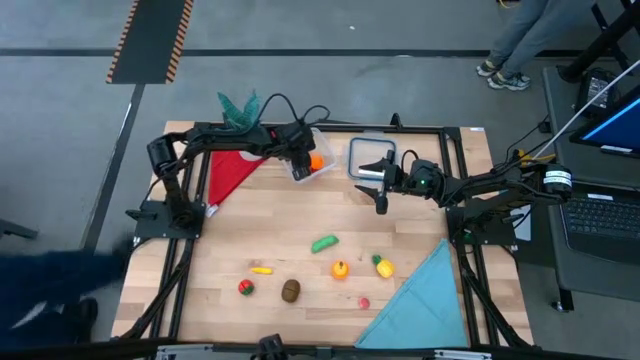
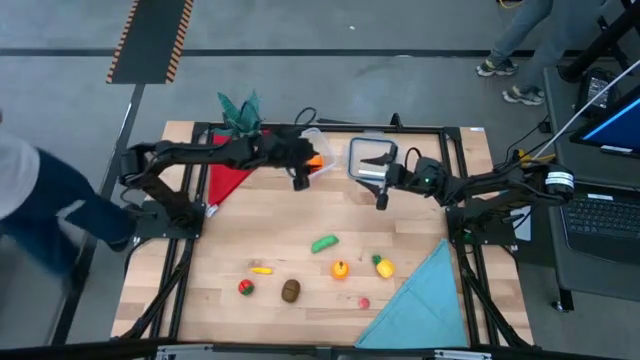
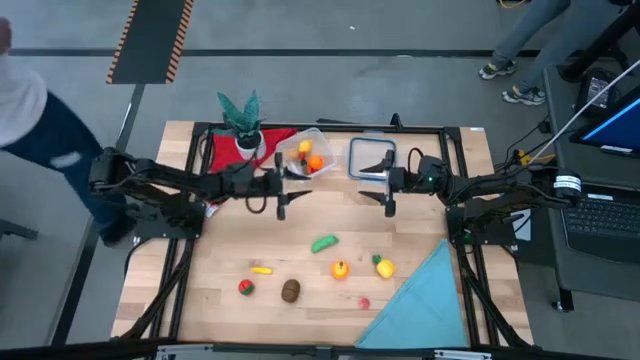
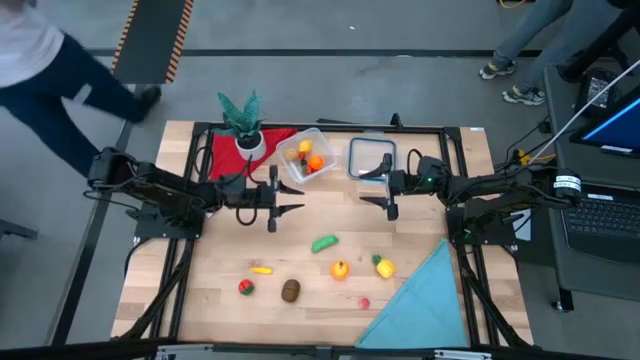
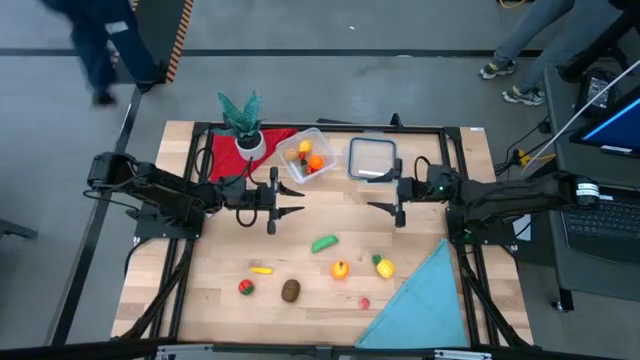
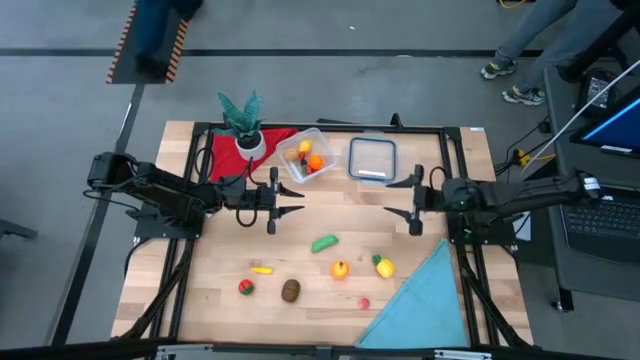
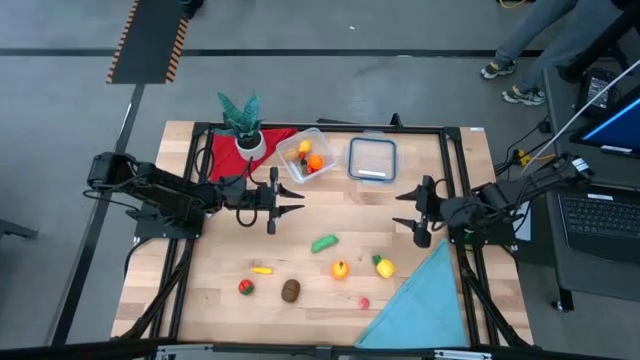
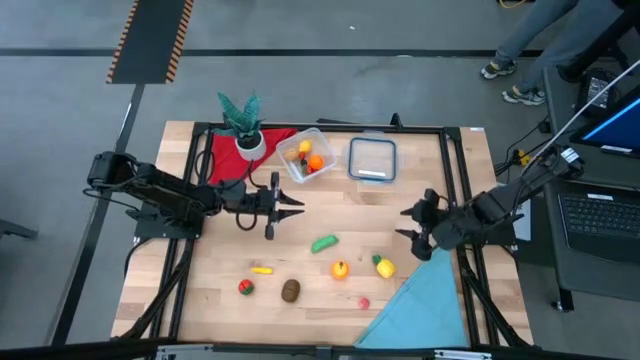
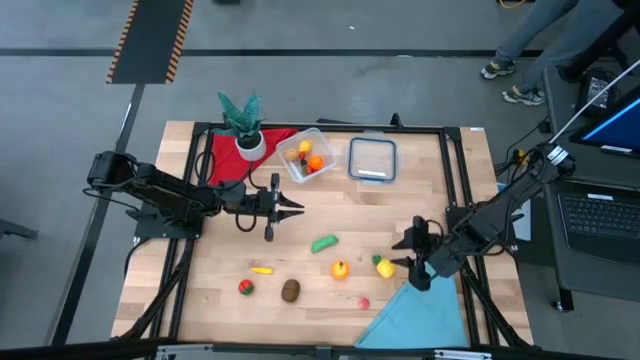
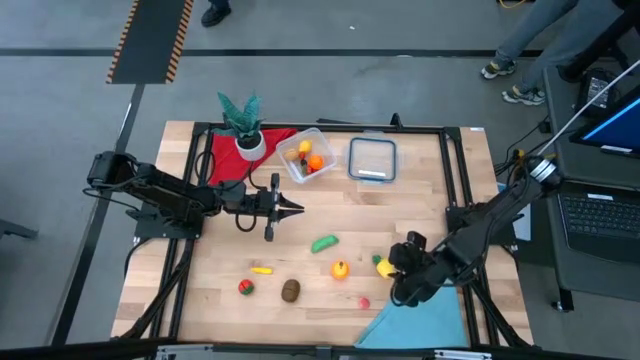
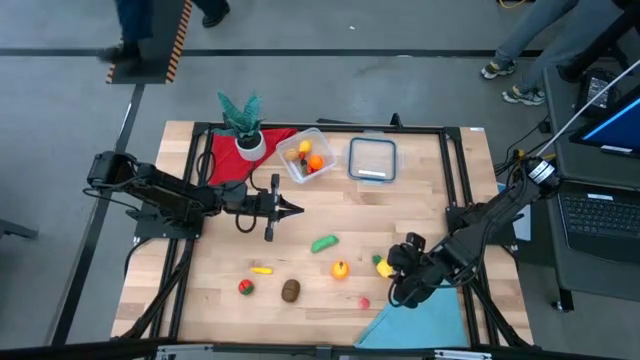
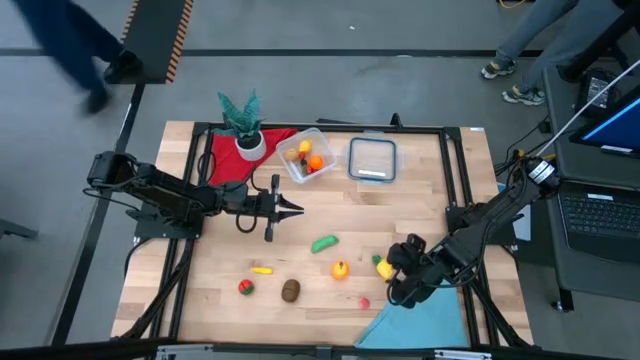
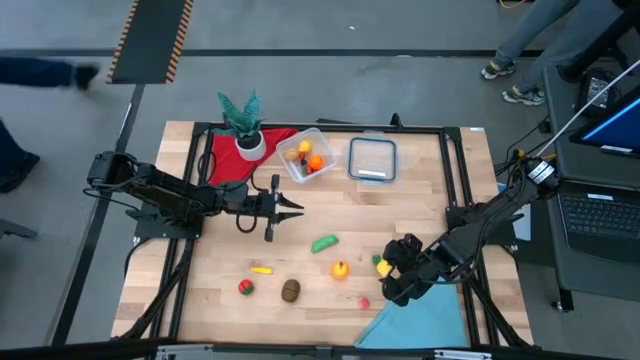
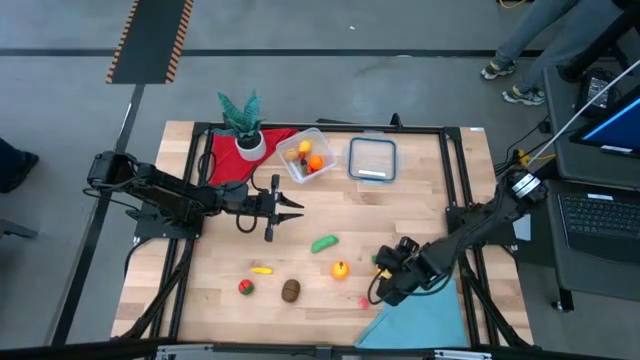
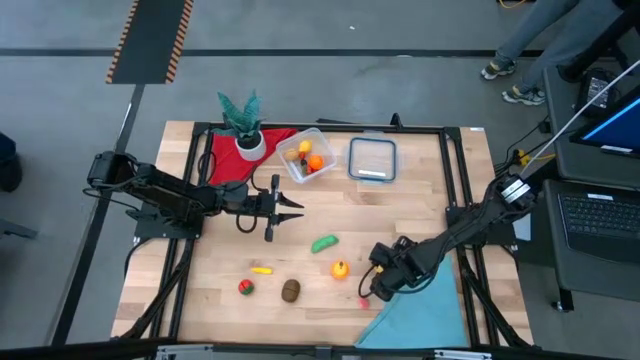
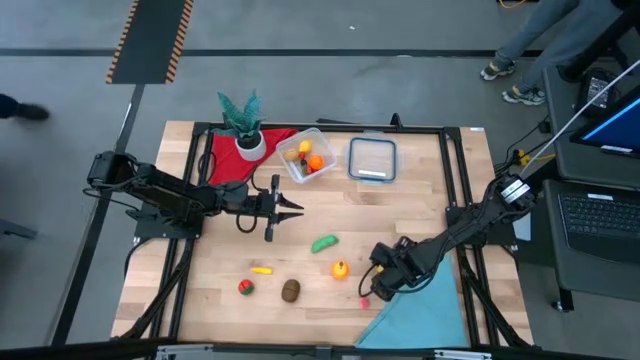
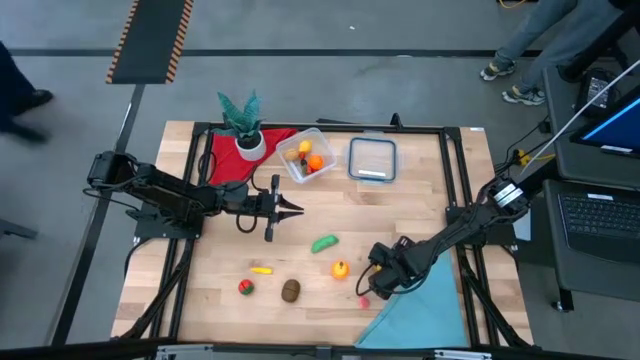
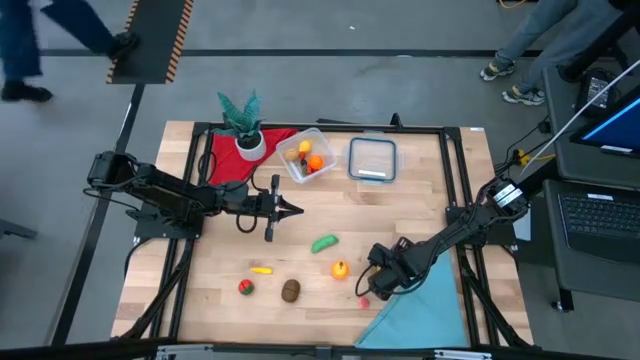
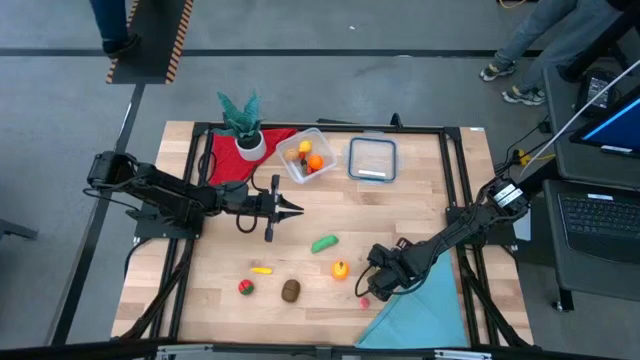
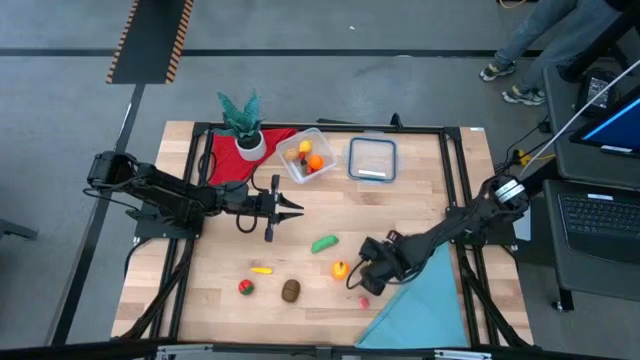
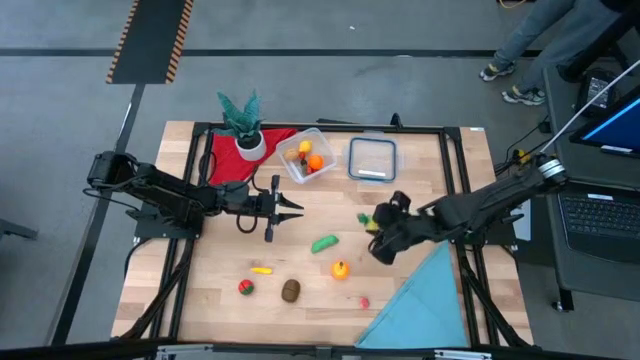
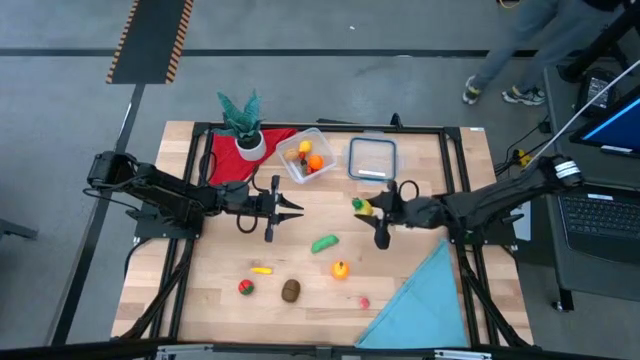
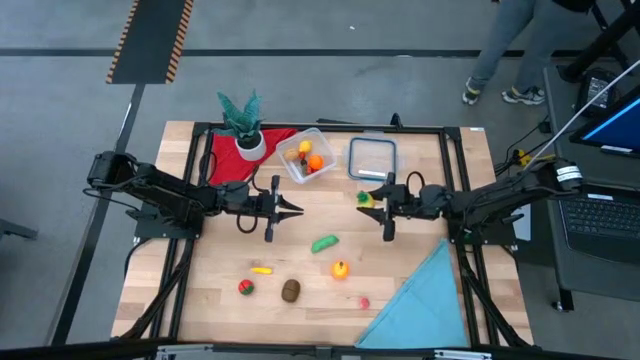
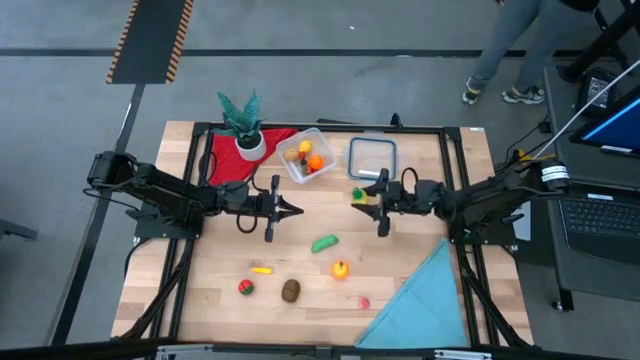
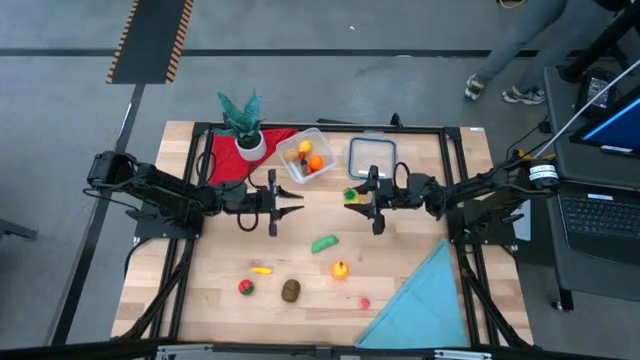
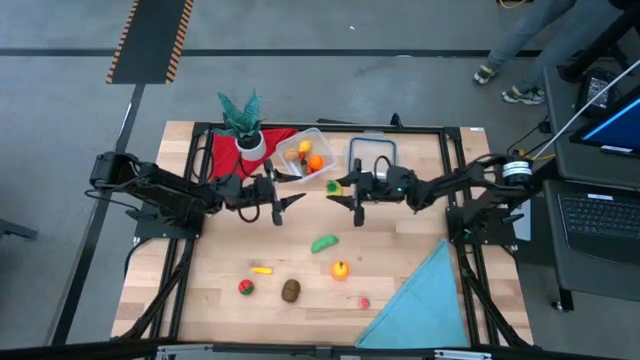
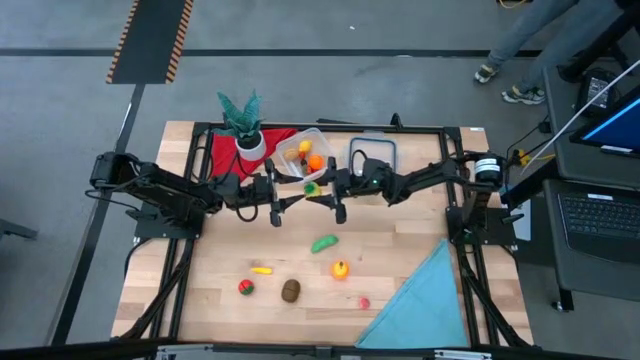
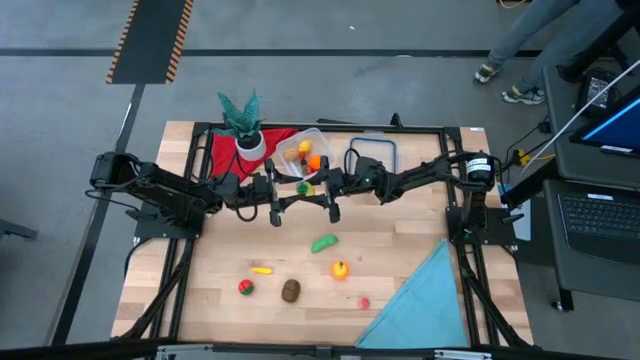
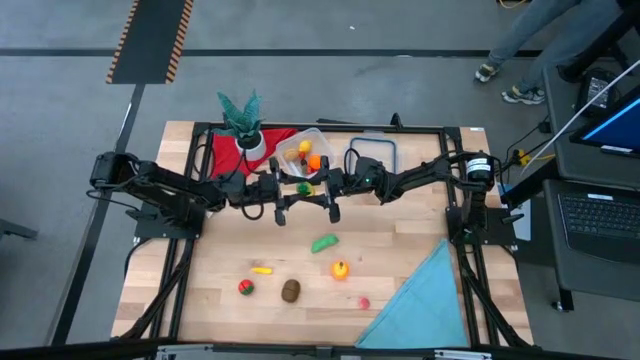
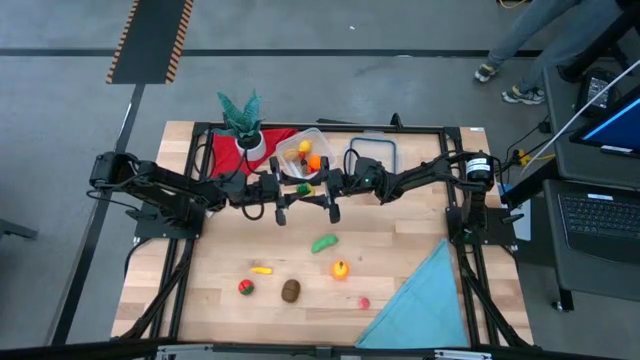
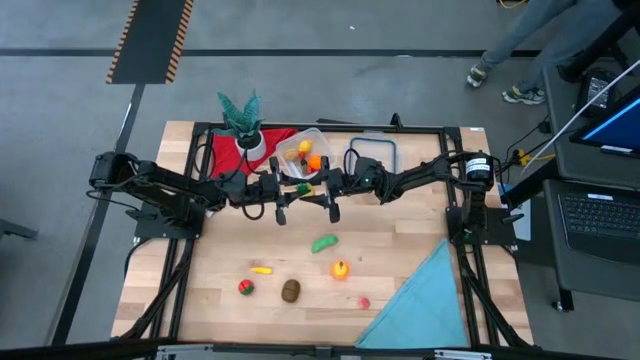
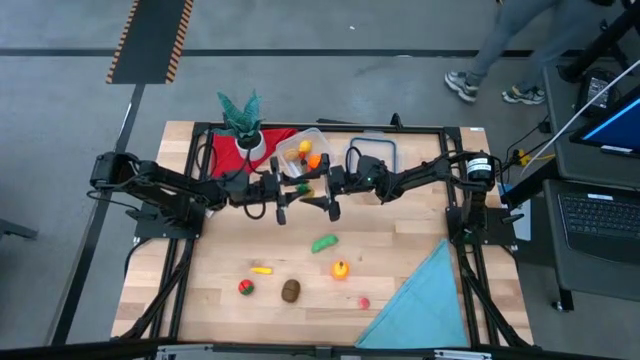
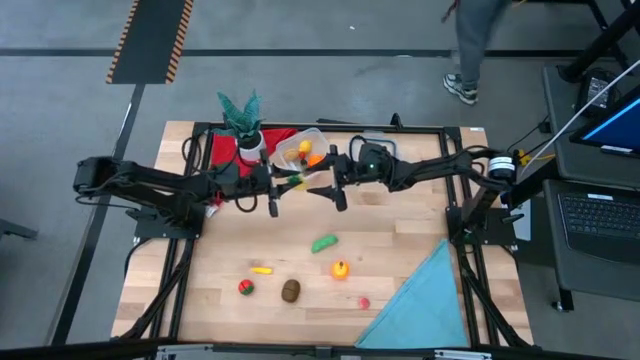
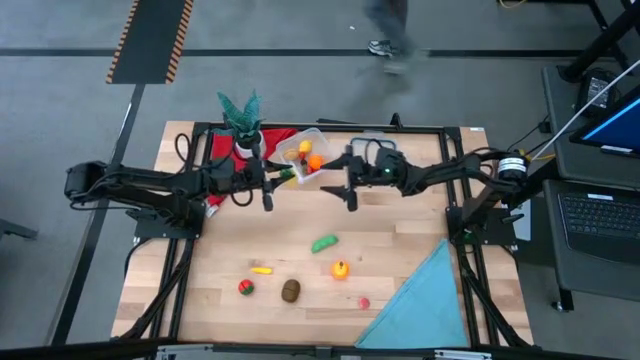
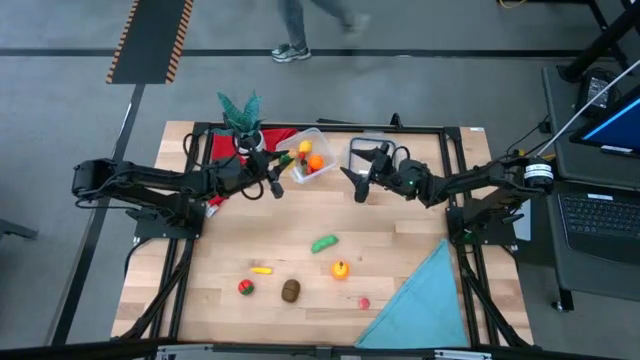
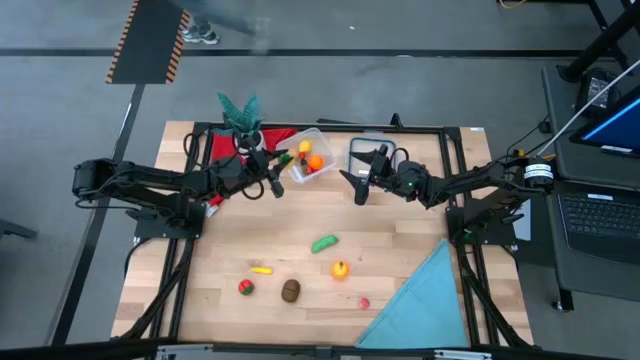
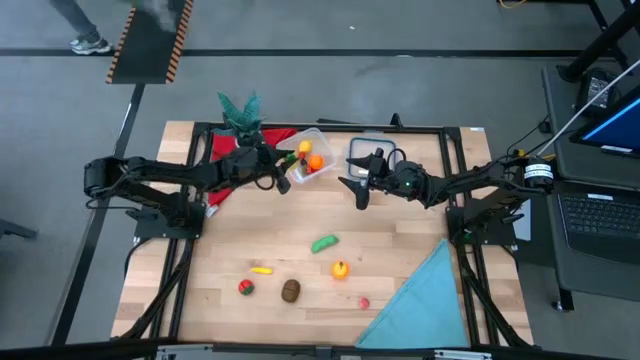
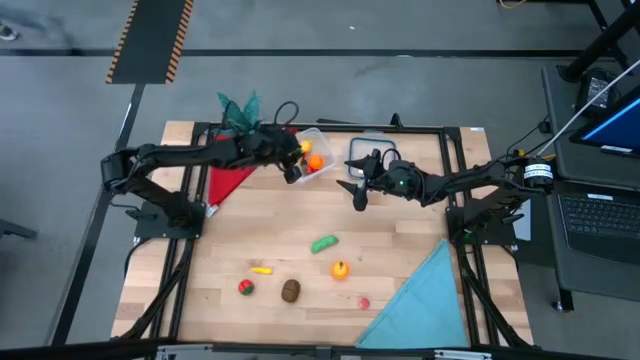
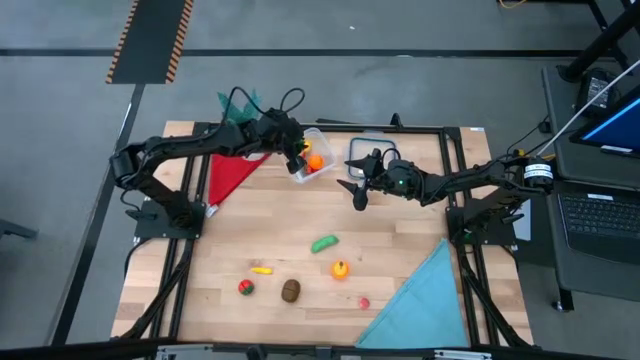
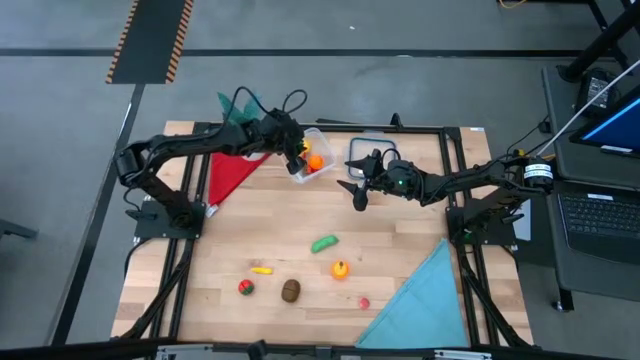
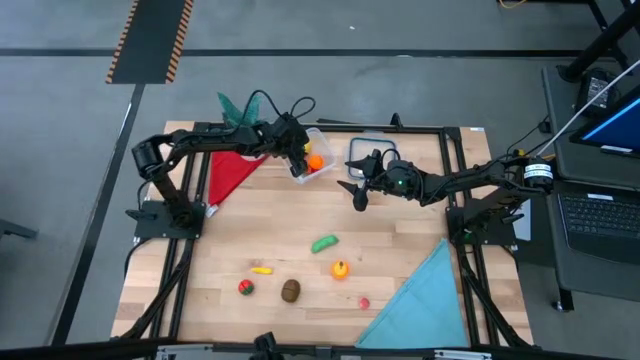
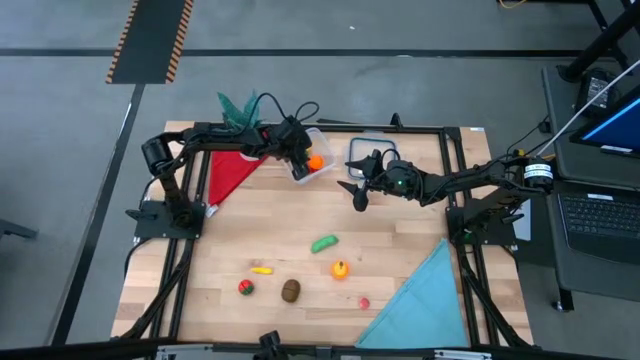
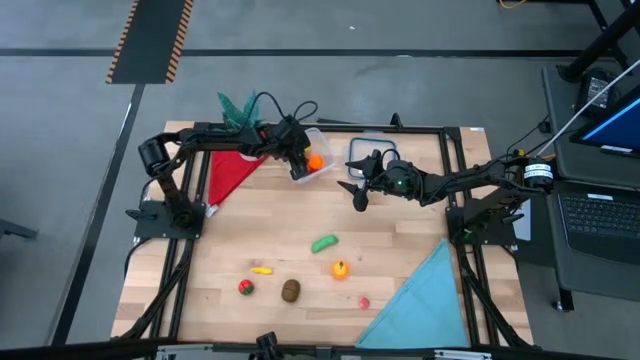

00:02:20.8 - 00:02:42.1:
Task: Pick and placing Produce into tupperware
Put the pineapple into the transparent bin
